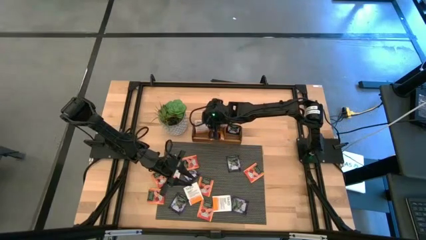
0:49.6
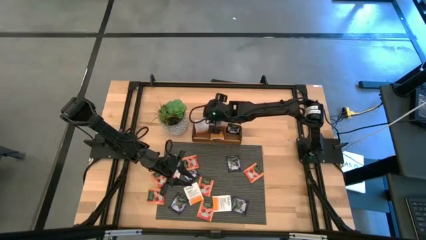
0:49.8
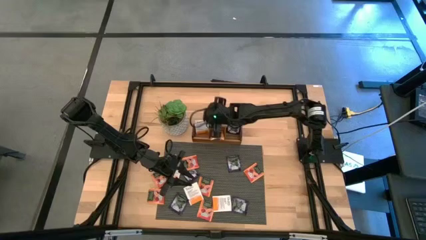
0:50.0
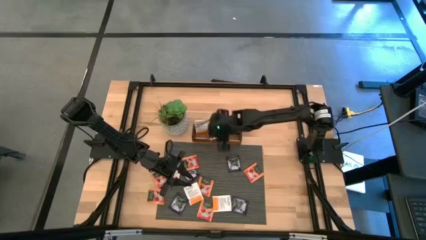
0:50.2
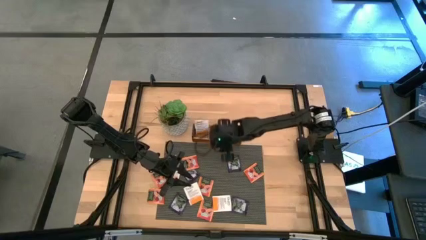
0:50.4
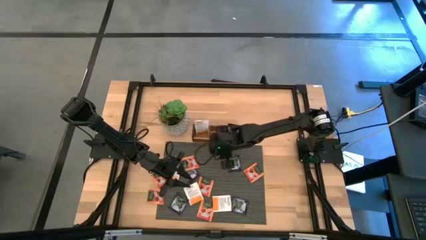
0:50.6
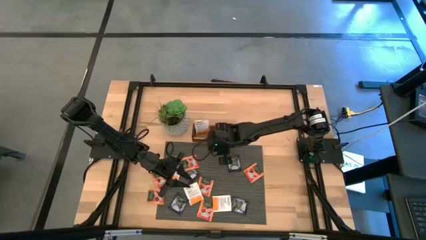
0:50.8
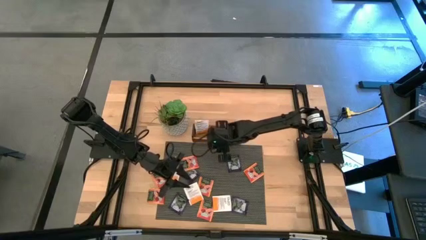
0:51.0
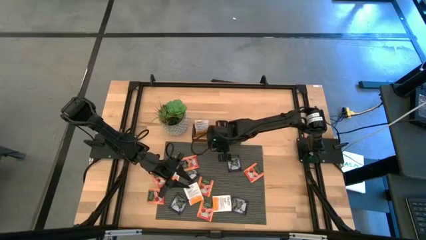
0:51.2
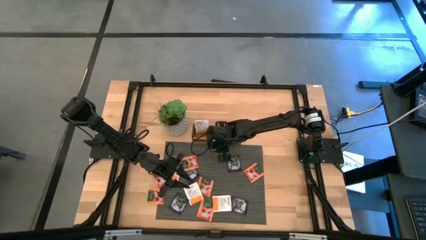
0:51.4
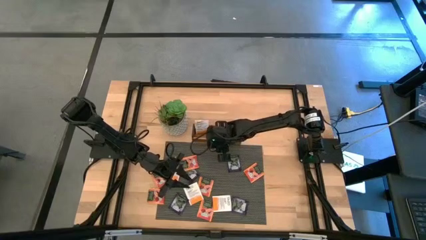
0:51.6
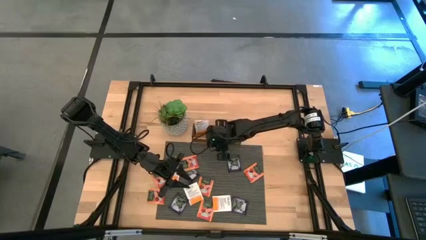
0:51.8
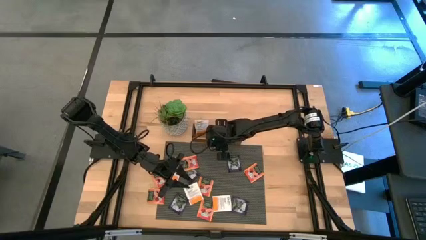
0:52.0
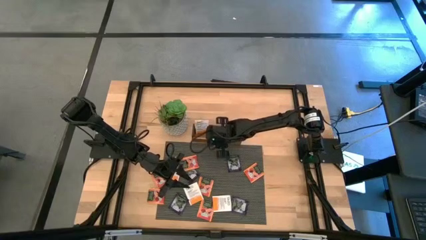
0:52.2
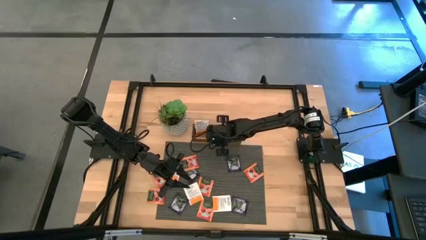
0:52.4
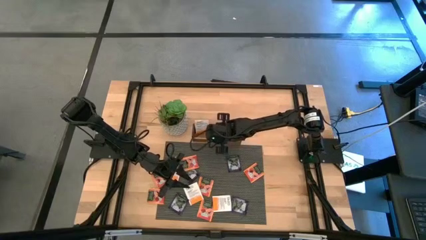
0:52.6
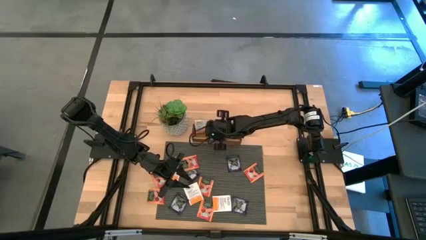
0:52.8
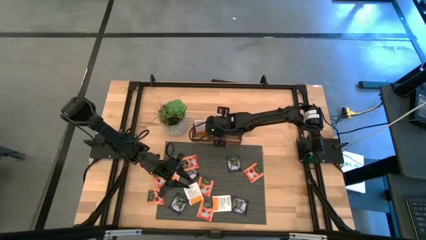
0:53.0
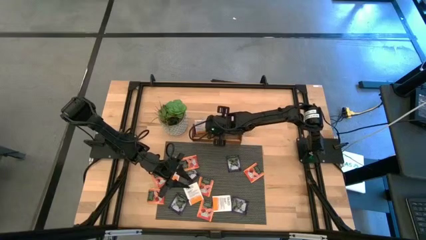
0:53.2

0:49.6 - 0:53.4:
Task: Pick & Place Tea
Adjust the orange tea bag in the middle section of the wooden organizer

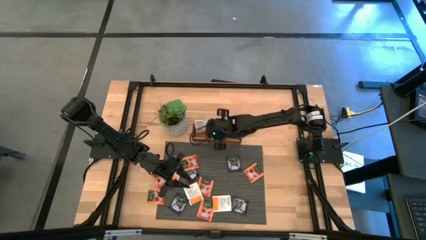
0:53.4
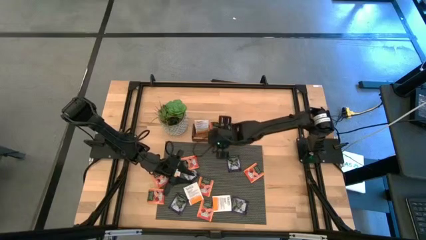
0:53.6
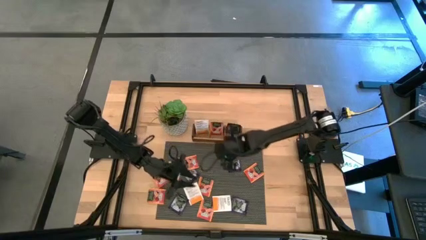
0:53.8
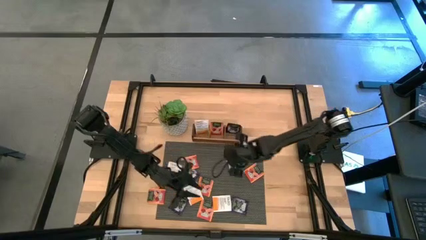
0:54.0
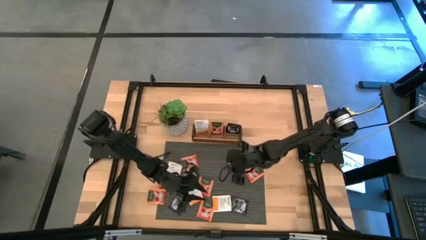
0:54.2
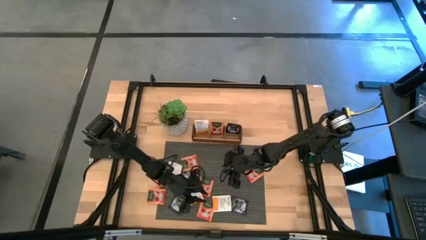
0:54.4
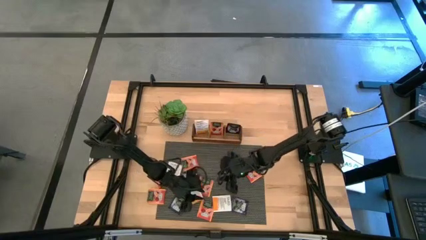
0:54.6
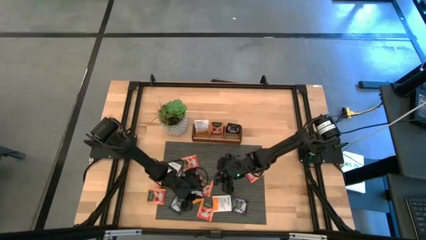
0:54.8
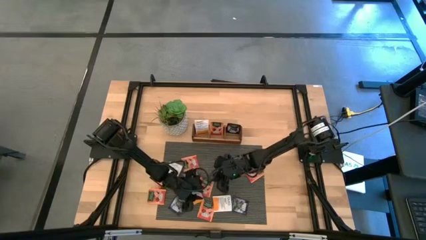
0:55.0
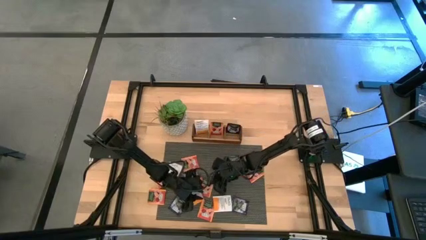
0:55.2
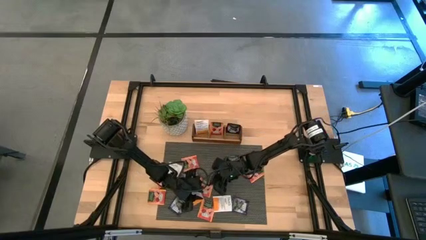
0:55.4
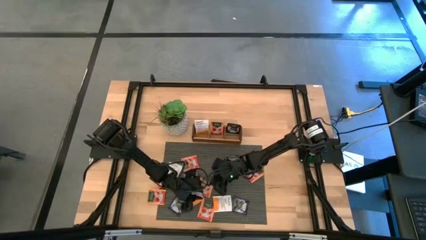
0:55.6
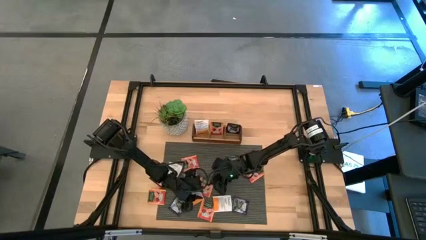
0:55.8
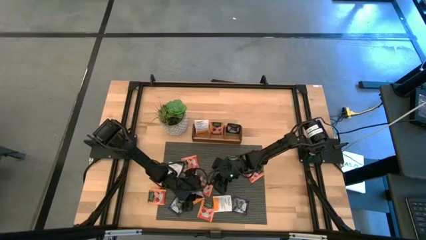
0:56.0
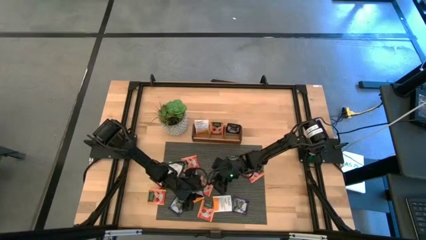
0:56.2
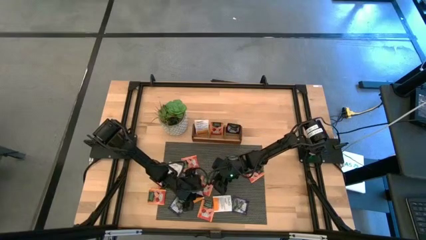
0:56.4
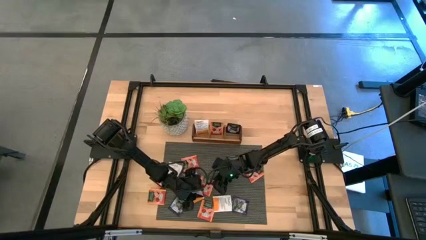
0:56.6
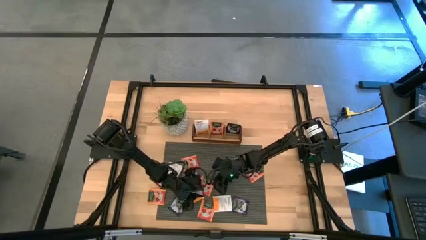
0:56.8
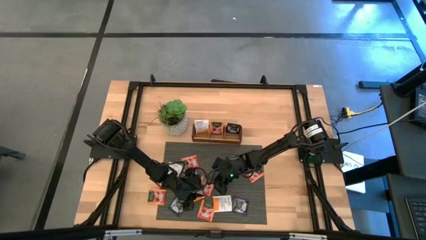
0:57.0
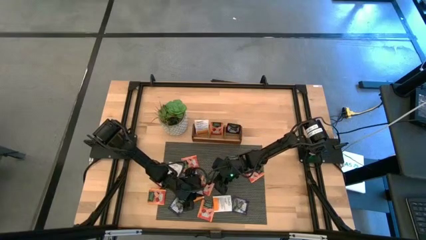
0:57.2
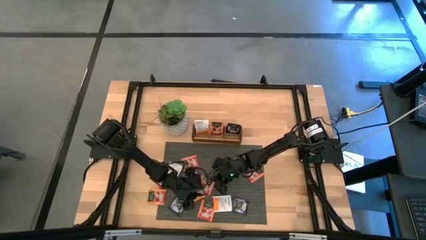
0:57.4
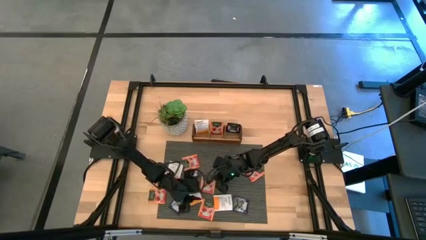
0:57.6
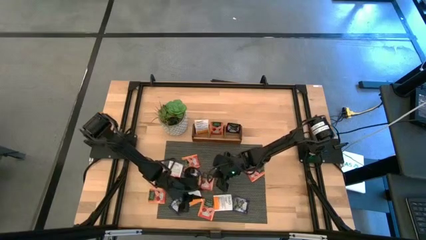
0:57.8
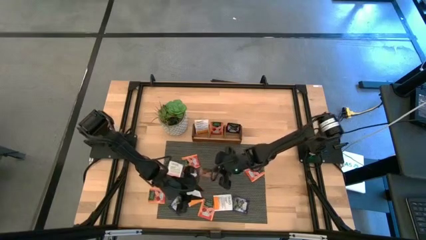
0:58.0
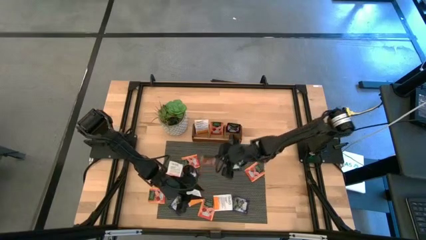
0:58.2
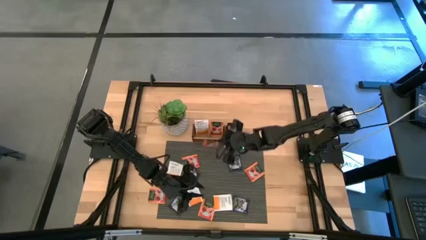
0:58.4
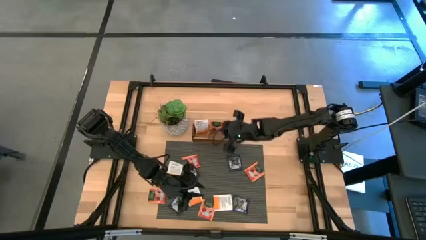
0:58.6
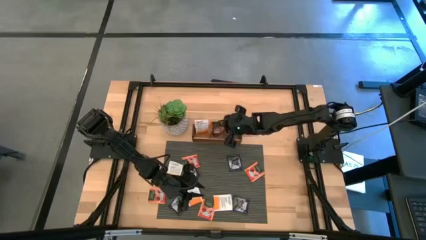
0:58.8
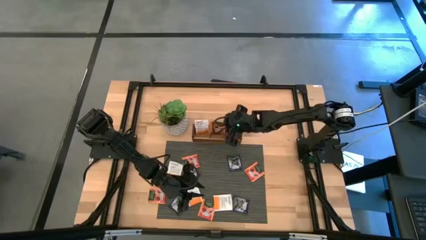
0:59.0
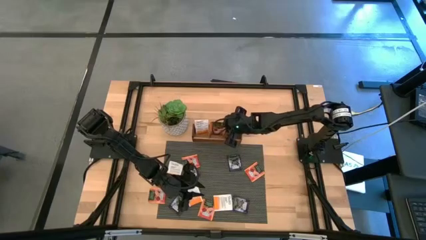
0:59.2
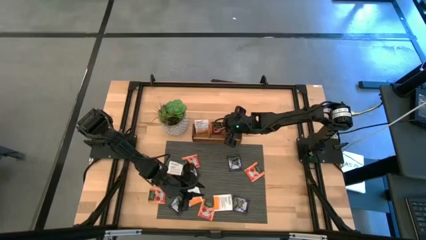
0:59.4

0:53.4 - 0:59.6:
Put the orange tea bag into the middle section of the wooden organizer

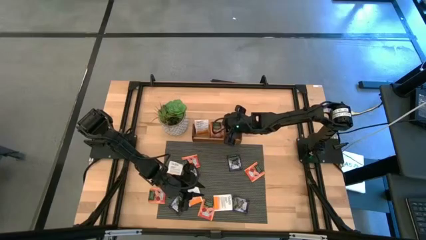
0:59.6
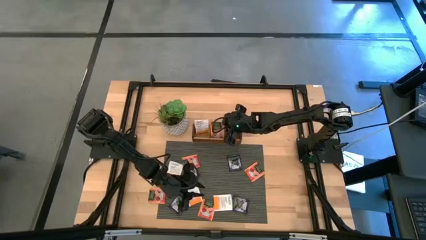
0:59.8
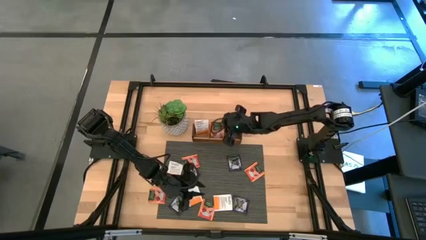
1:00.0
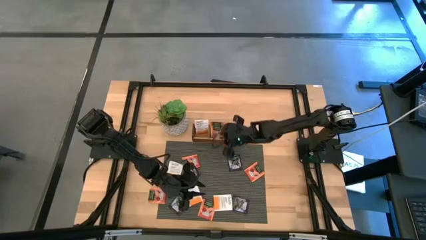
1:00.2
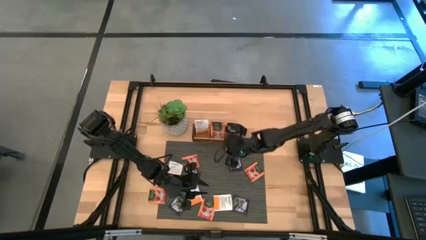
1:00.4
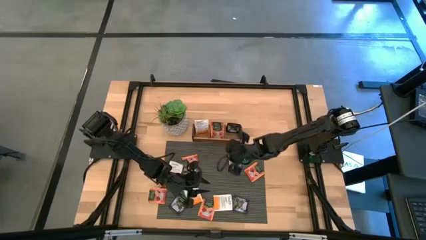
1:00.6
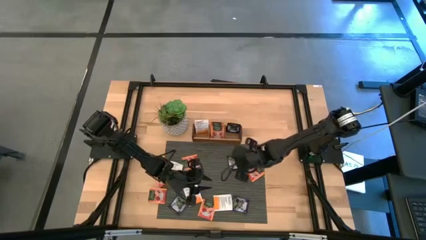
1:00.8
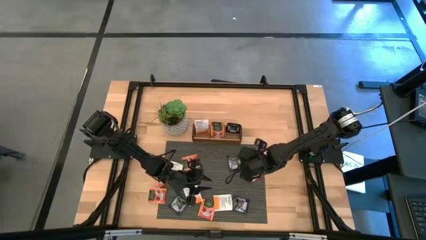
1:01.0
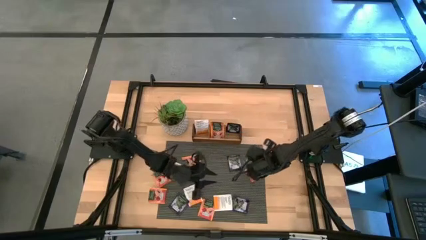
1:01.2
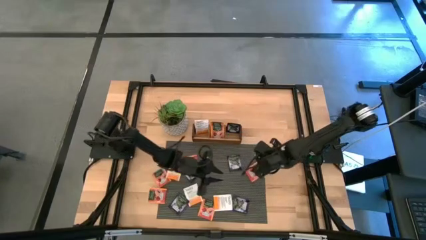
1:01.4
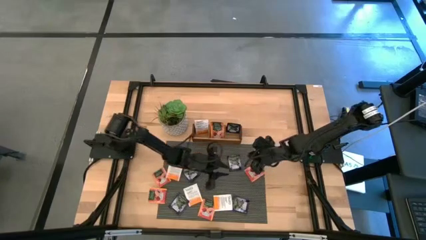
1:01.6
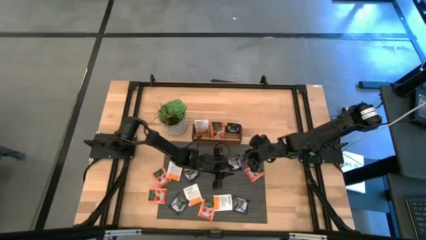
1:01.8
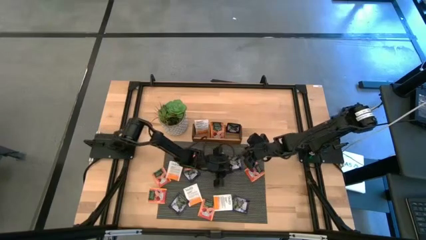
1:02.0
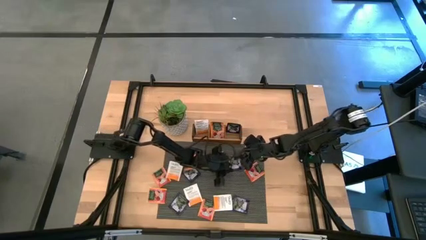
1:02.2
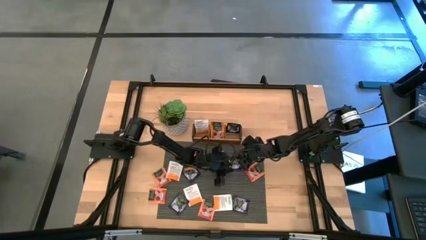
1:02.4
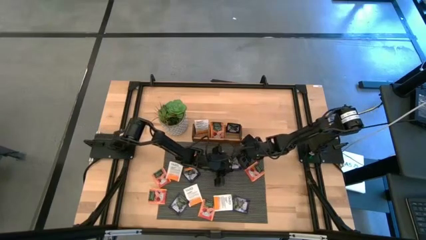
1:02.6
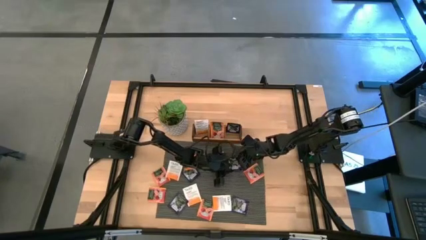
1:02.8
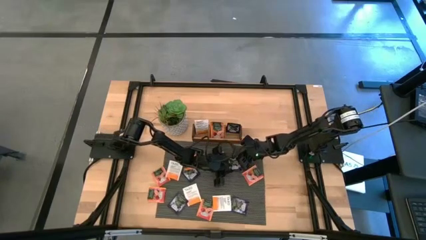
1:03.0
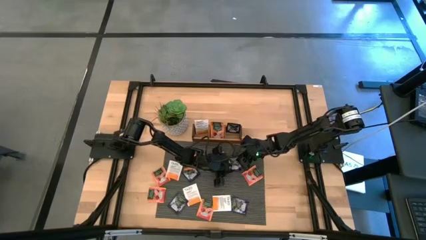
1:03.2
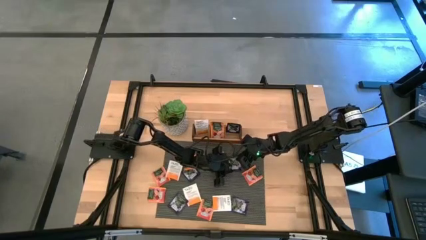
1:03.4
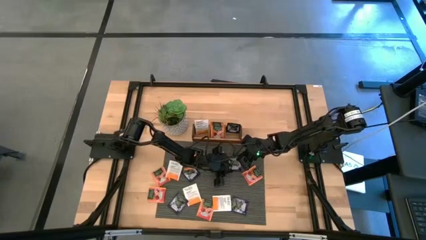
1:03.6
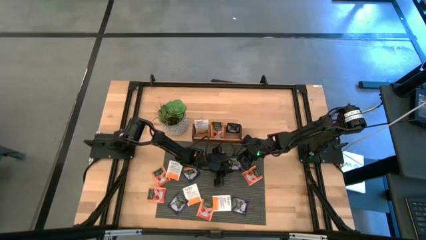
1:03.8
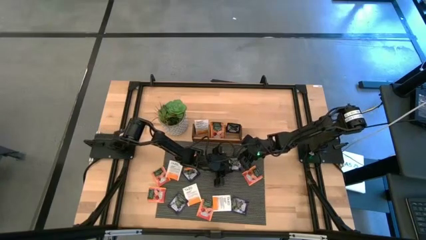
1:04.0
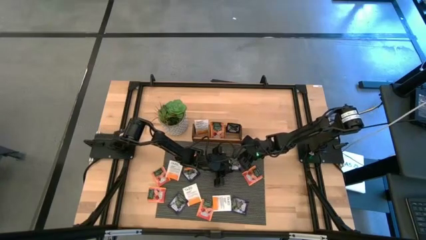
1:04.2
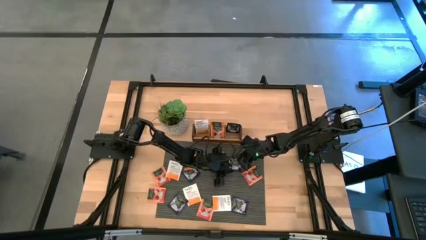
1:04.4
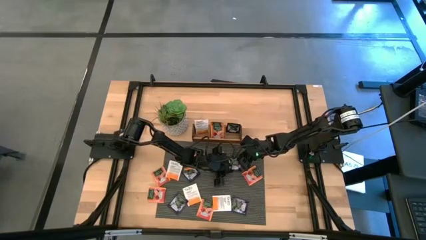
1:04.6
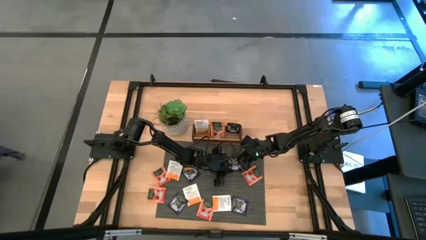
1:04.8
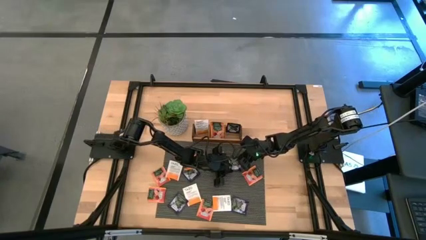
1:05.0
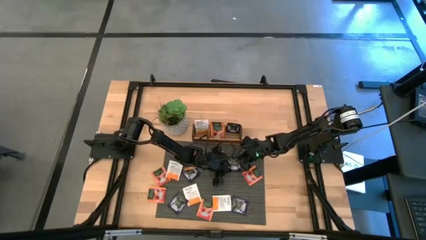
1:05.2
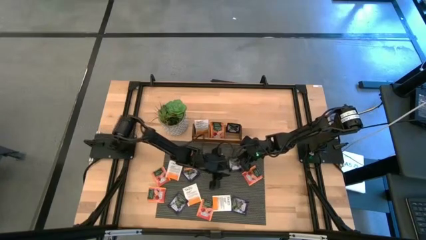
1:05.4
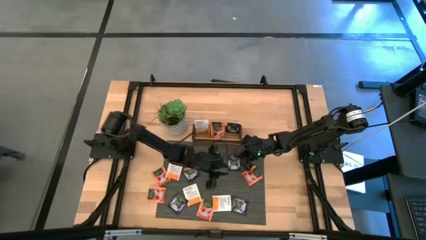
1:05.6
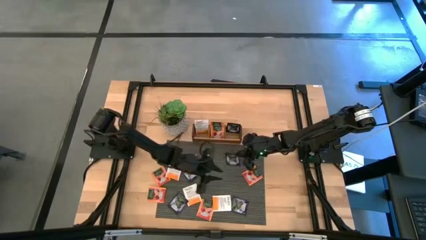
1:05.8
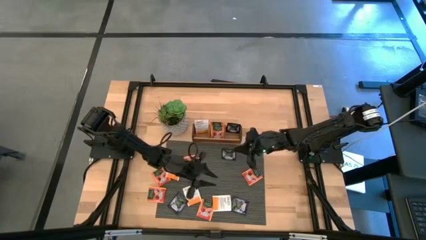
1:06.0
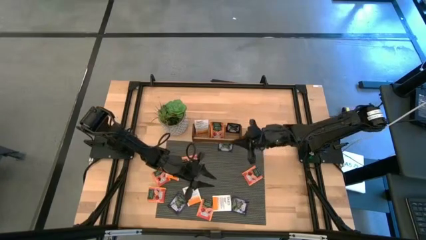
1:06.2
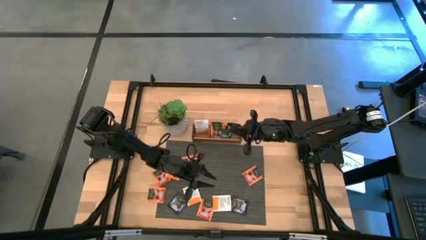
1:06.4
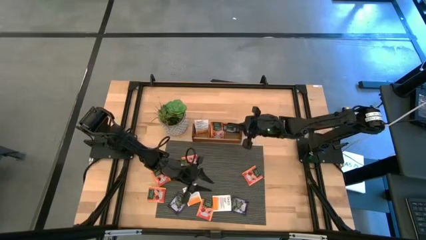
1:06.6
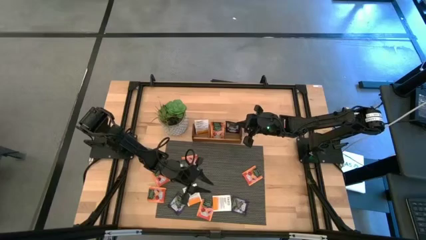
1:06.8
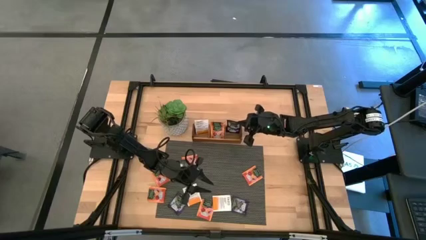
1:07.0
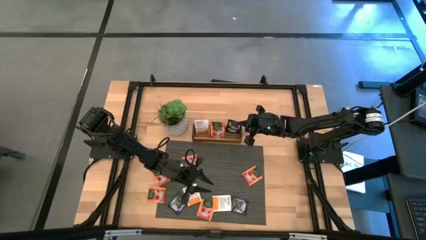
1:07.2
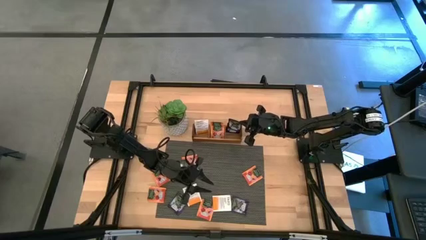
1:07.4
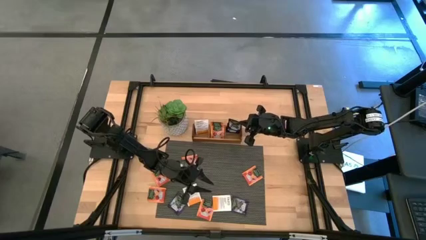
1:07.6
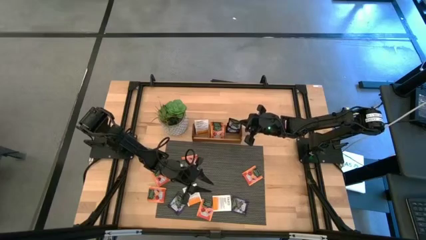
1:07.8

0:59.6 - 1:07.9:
Put the blue tea bag into the right section of the wooden organizer
